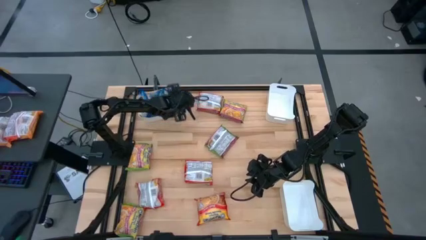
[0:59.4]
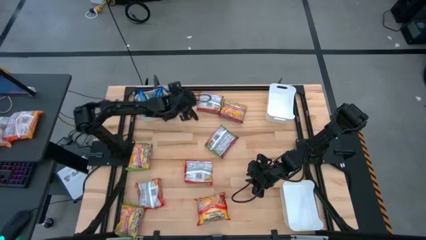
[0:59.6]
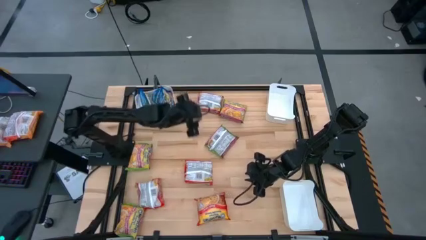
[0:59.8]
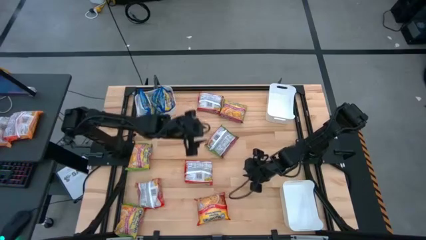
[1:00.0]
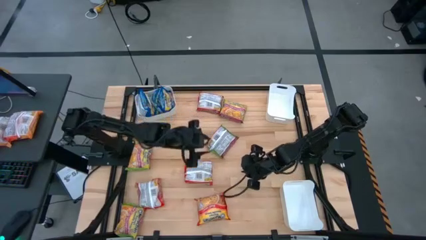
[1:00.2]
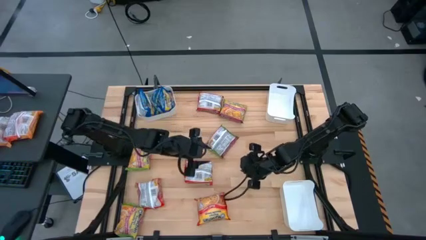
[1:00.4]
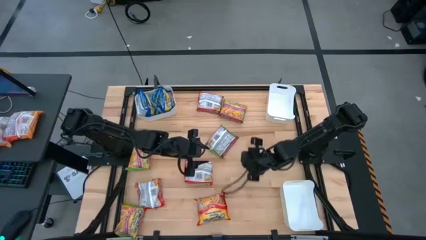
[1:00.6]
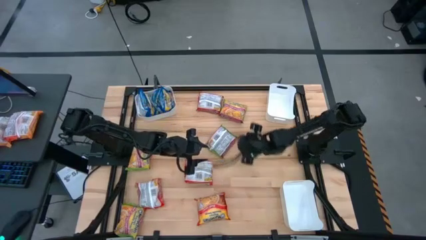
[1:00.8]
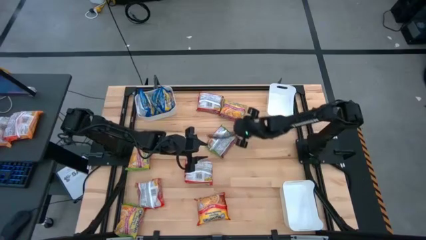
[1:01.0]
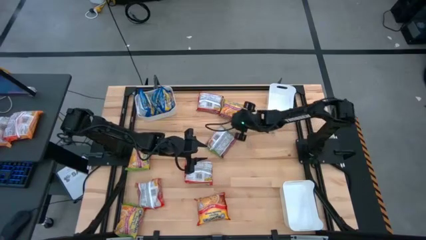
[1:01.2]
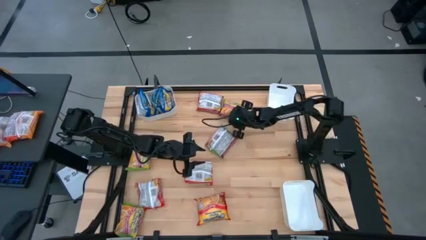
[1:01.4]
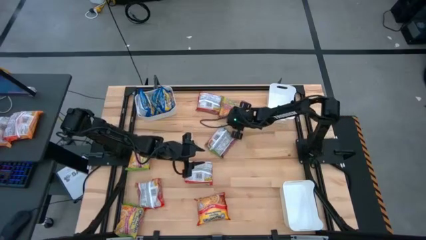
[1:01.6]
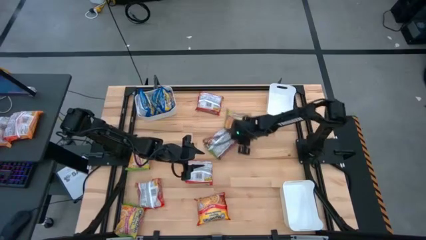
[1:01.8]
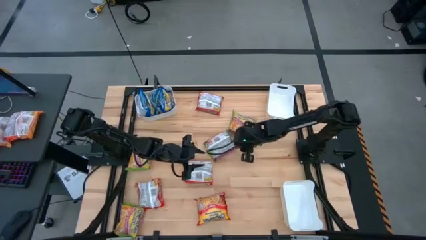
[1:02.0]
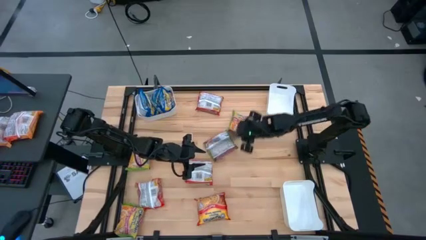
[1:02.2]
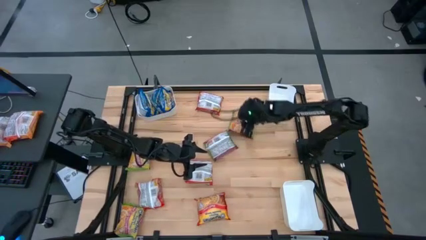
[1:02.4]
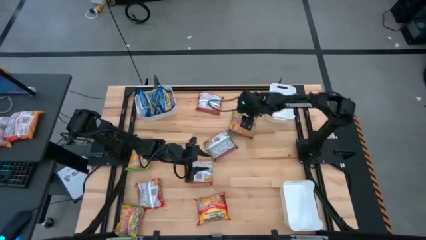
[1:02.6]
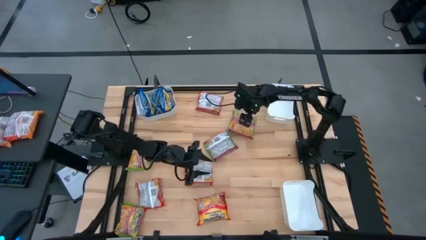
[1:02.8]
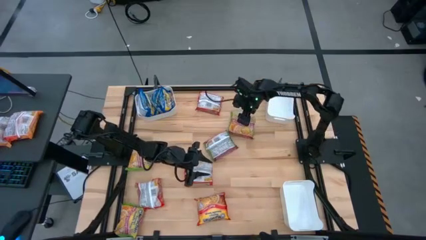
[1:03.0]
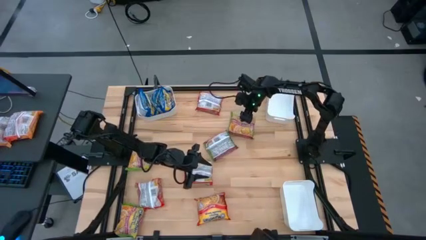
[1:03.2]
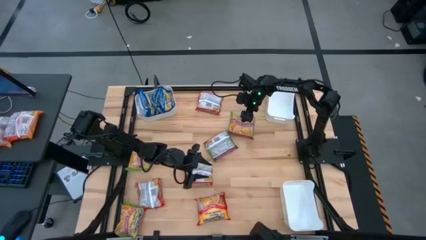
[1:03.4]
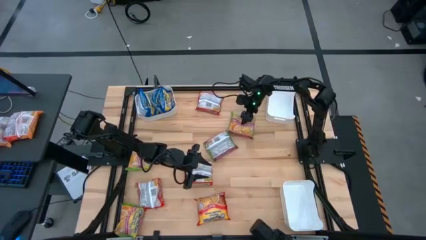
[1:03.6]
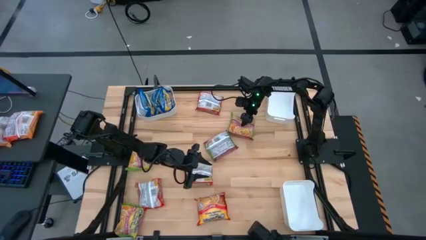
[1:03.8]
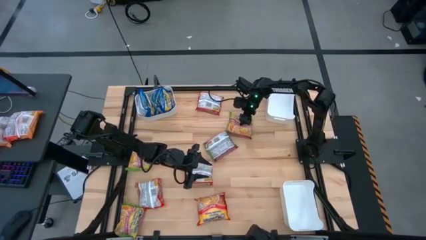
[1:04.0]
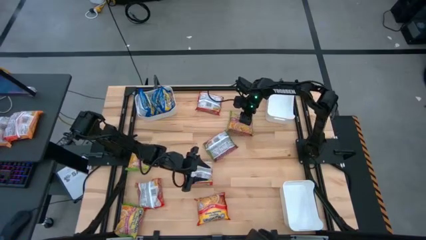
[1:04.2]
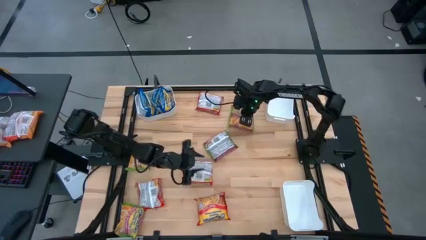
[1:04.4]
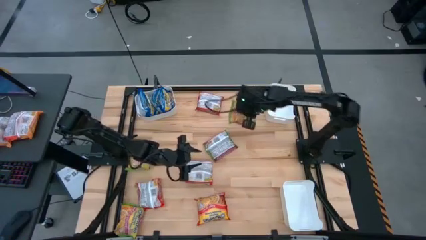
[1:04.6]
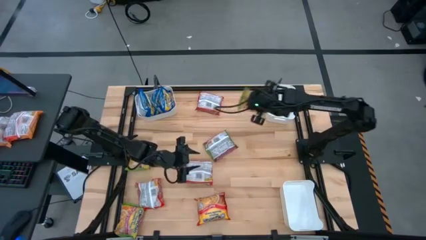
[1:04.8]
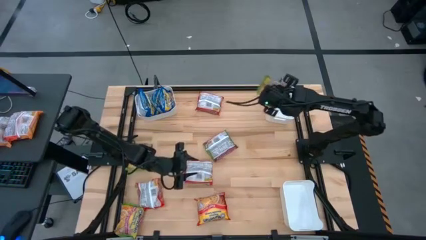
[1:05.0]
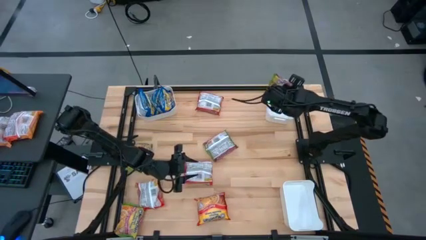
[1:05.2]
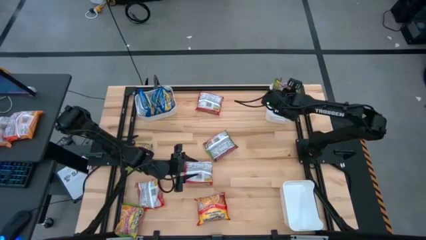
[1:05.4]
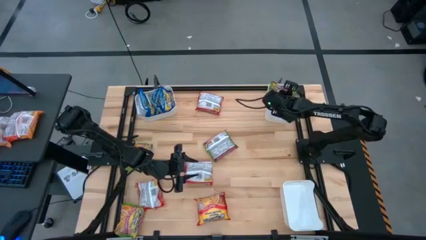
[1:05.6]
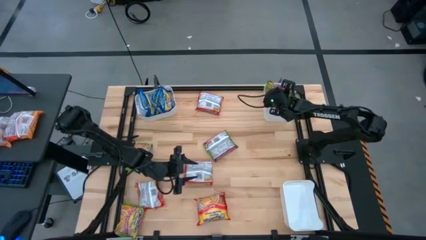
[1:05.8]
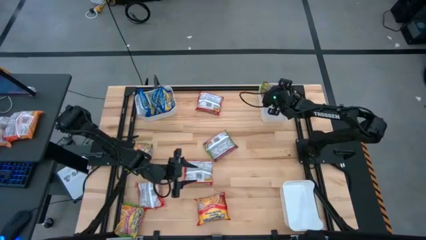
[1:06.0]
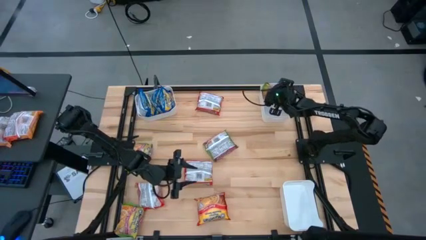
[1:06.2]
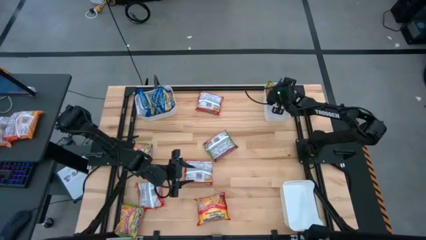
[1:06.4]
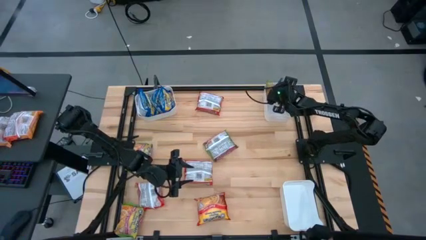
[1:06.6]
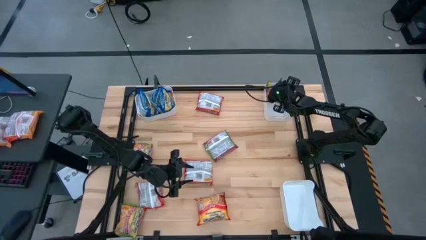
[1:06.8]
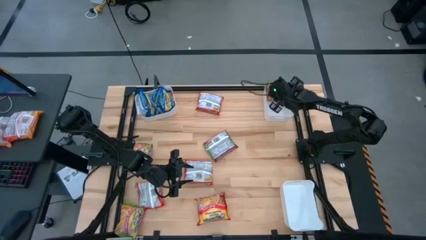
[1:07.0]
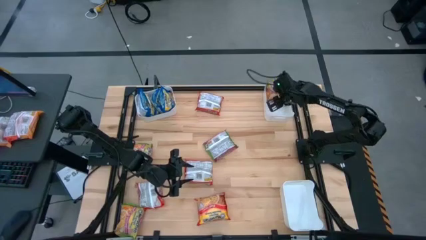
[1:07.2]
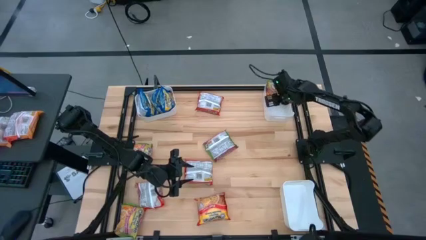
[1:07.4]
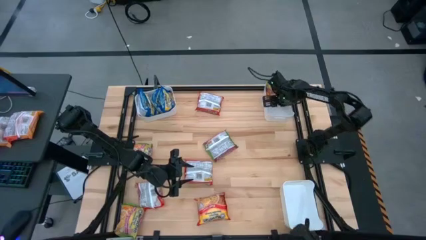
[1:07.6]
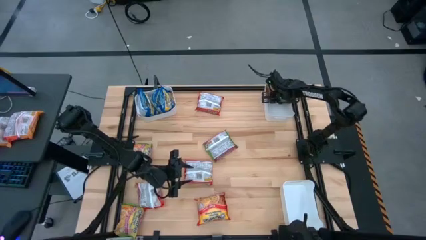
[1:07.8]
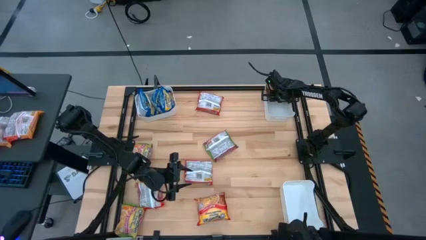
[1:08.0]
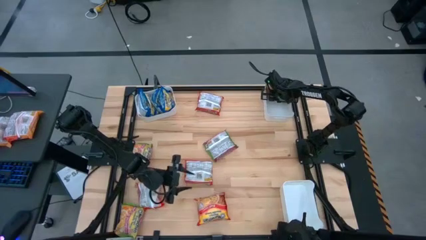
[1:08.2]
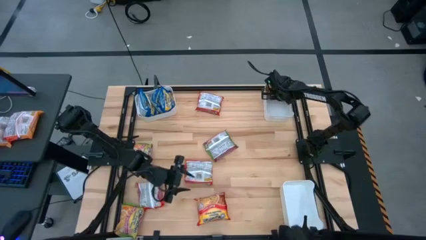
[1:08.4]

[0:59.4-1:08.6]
Task: Sort Maruchan noodles
Put the green noodle pack into the top right white bin

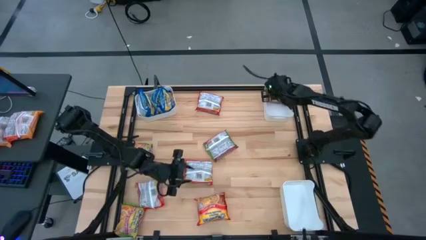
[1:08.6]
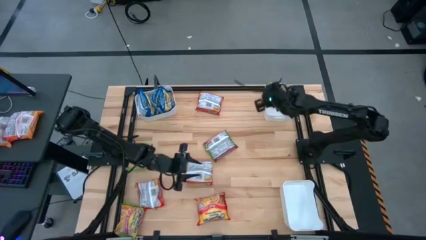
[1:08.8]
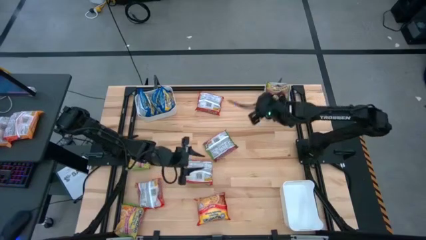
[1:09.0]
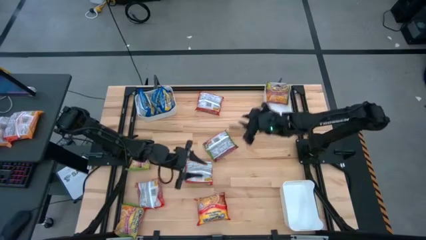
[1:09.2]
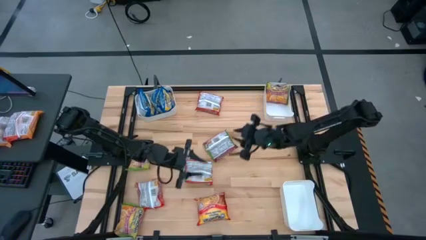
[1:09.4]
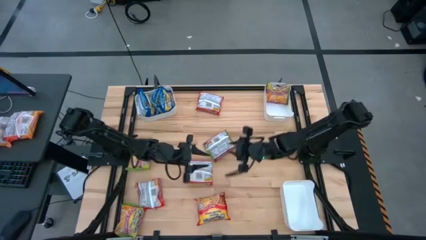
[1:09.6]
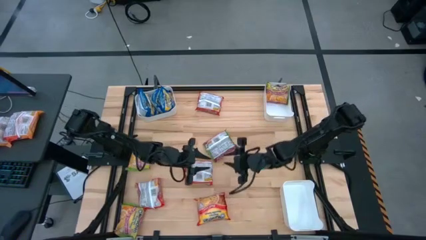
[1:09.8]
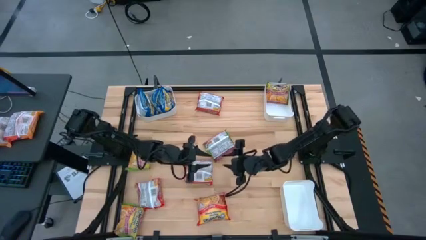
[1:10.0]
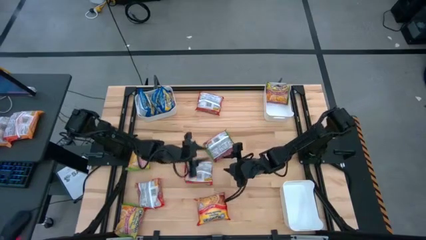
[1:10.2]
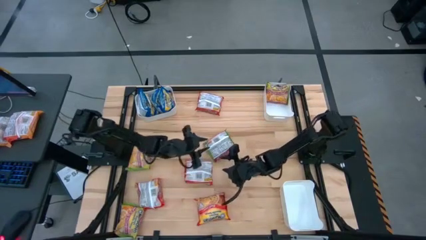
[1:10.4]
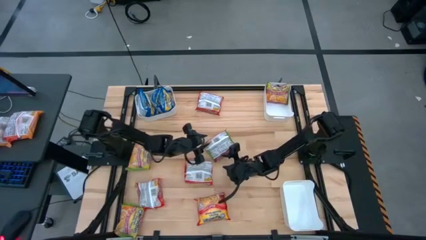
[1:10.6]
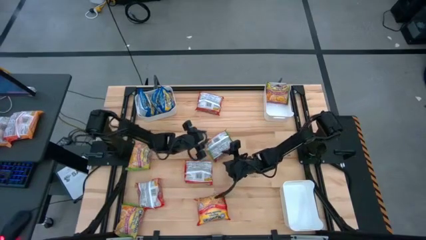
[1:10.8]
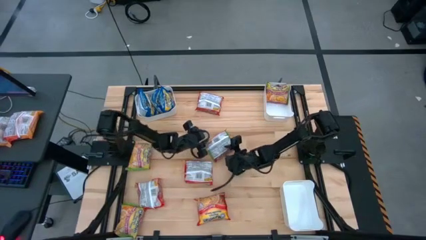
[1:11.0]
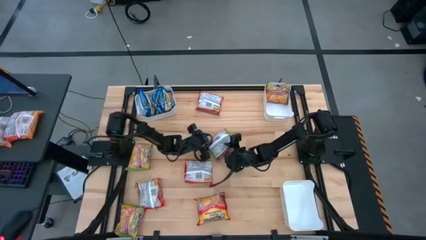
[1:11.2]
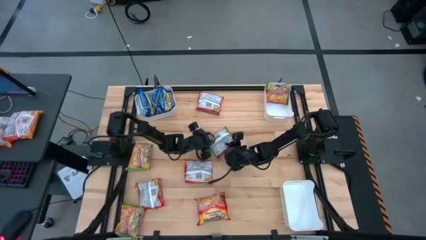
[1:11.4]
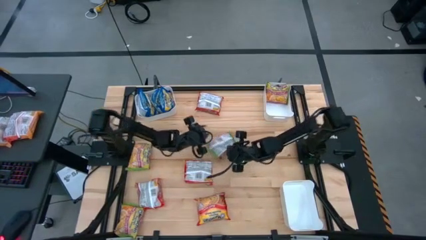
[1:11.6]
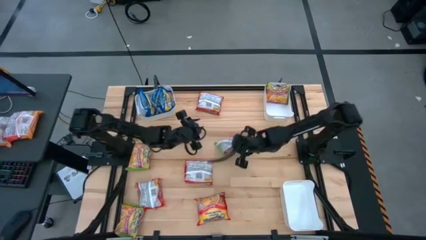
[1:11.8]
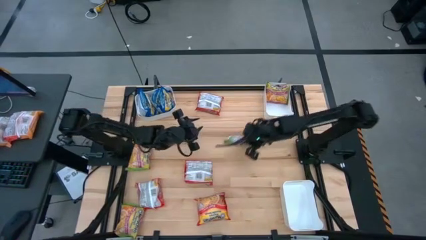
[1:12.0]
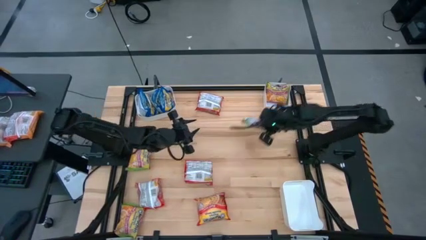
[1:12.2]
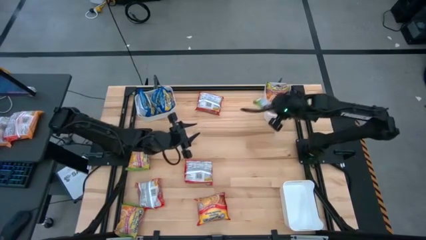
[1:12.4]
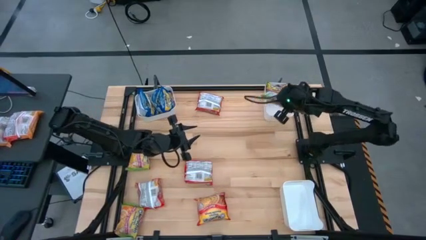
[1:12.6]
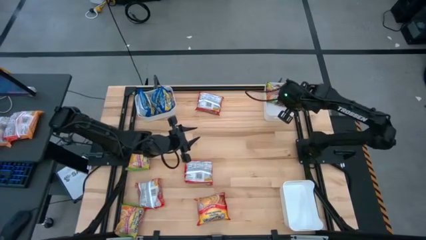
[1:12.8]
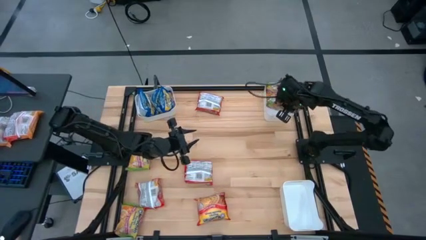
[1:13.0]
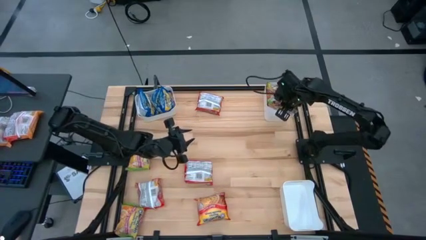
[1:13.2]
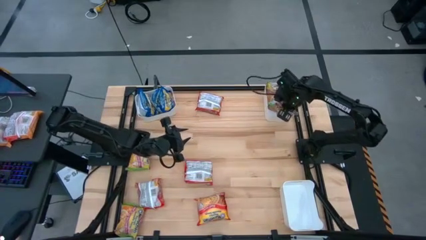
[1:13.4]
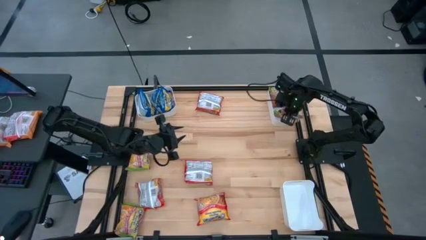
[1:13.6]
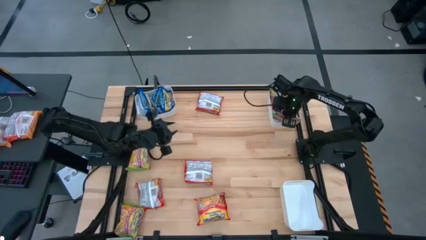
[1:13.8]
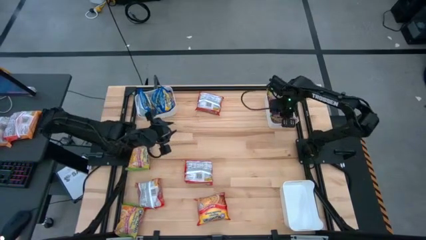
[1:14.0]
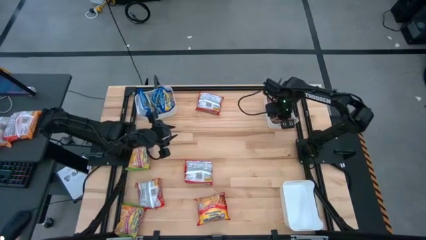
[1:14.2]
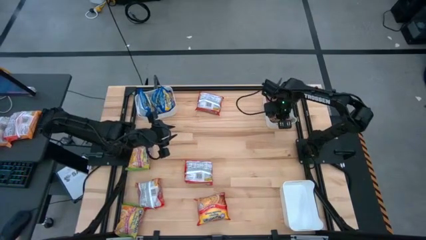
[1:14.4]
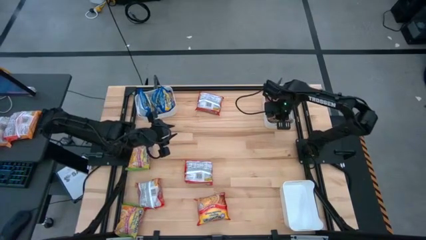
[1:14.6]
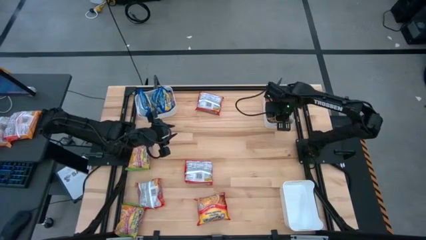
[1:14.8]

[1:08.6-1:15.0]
Put the green noodle pack into the top right white bin
